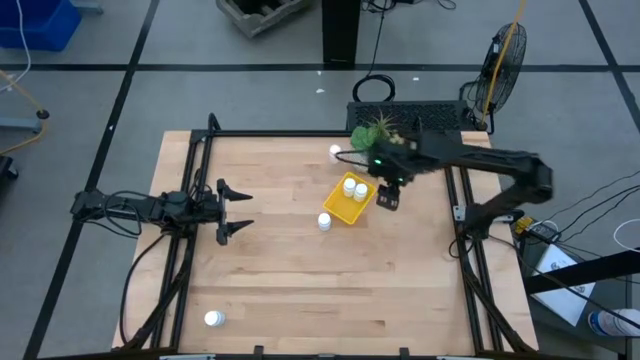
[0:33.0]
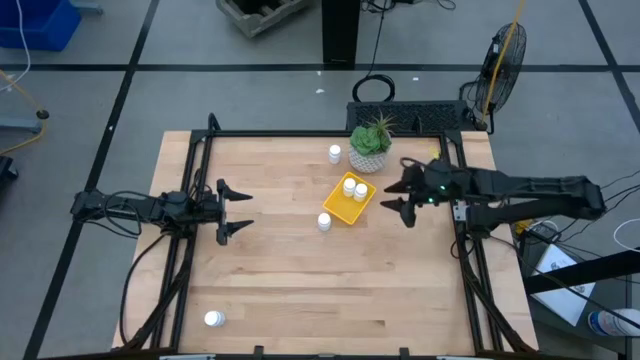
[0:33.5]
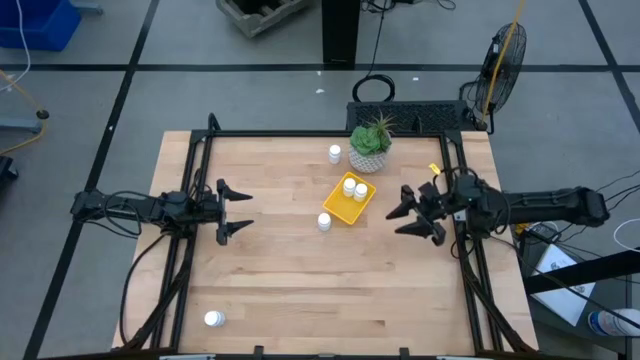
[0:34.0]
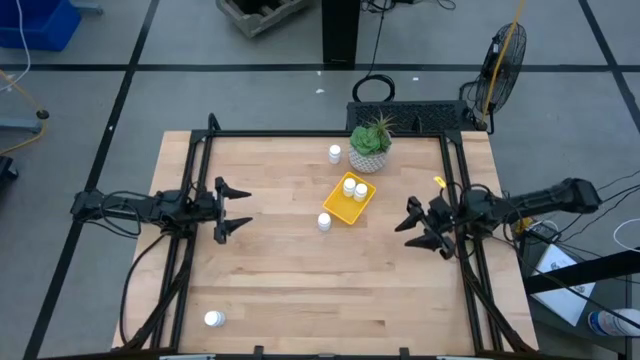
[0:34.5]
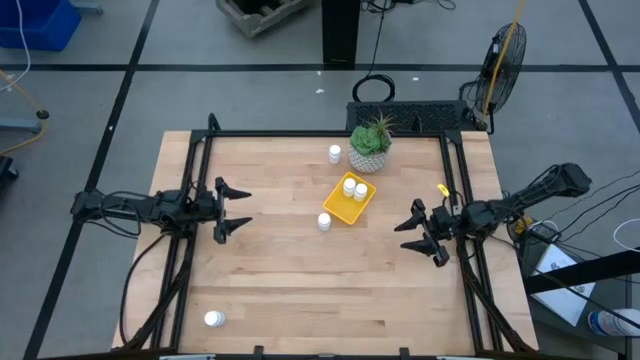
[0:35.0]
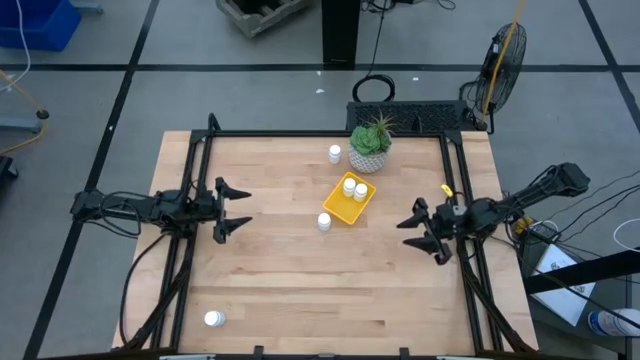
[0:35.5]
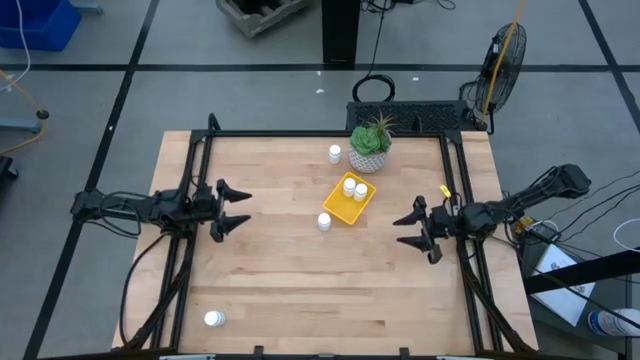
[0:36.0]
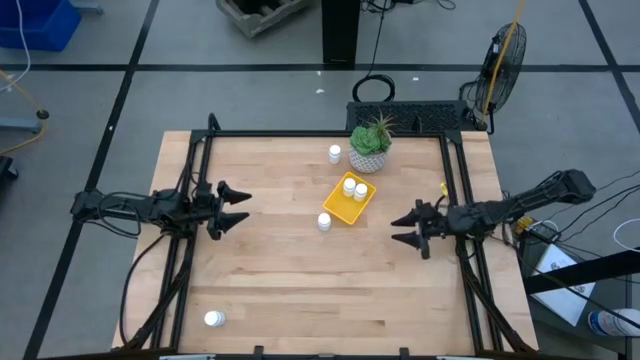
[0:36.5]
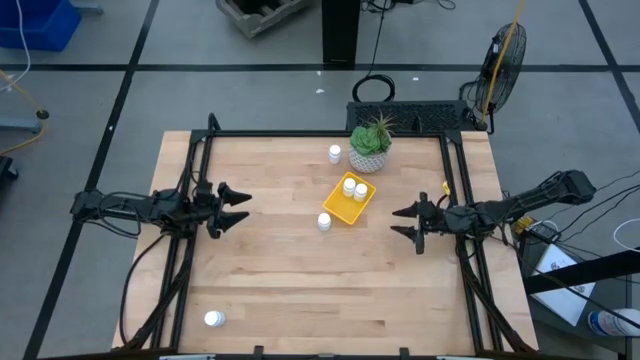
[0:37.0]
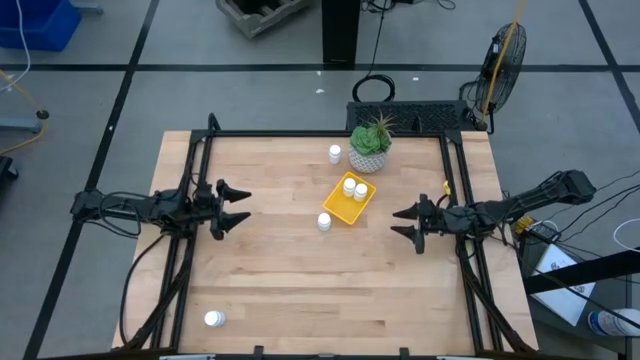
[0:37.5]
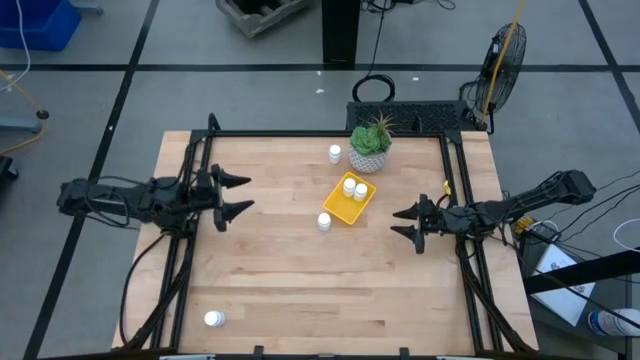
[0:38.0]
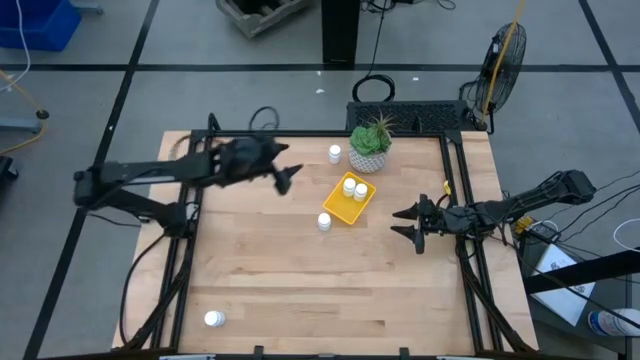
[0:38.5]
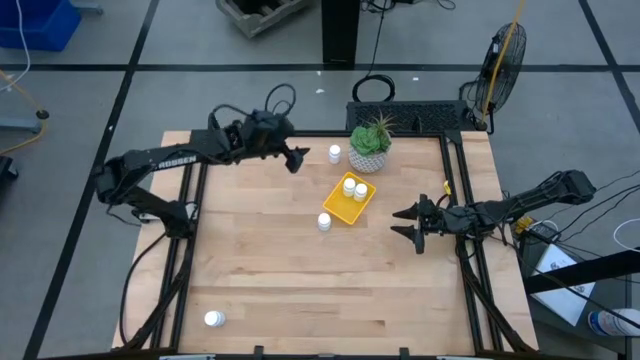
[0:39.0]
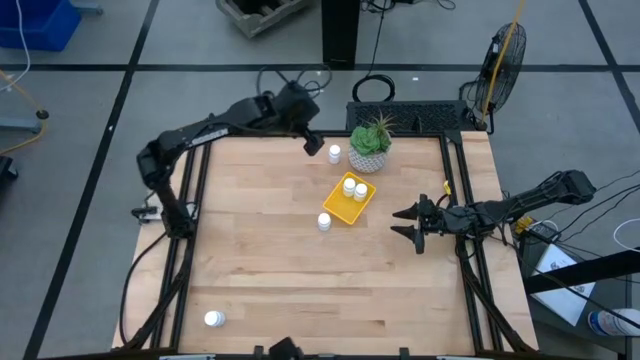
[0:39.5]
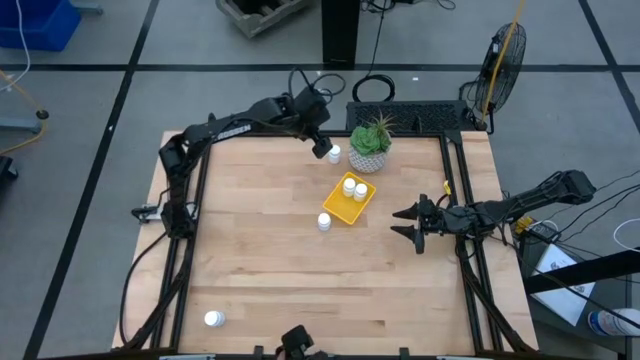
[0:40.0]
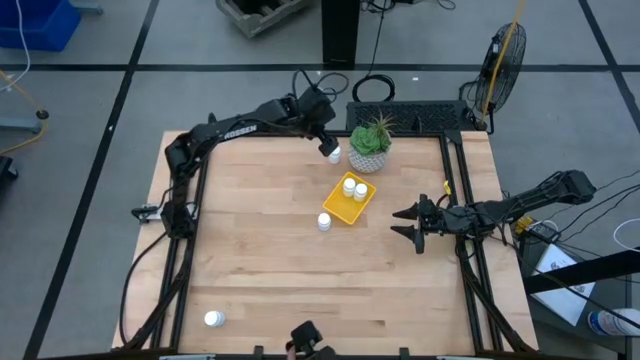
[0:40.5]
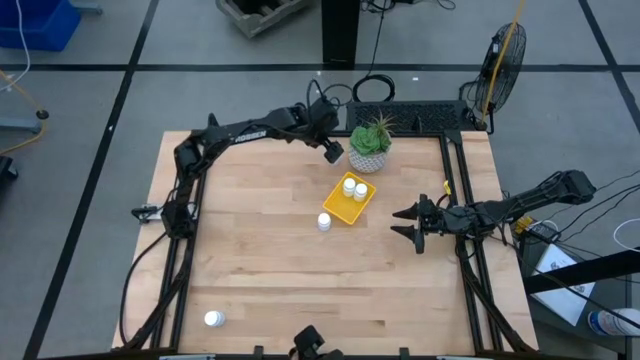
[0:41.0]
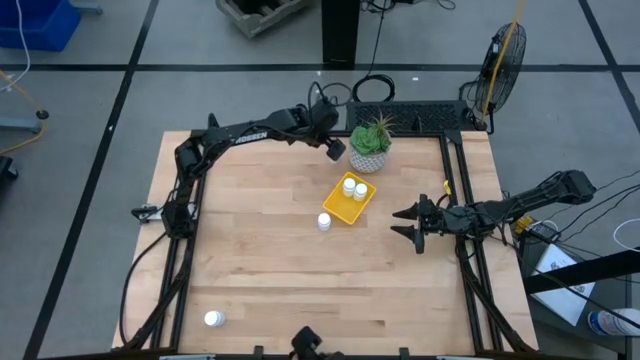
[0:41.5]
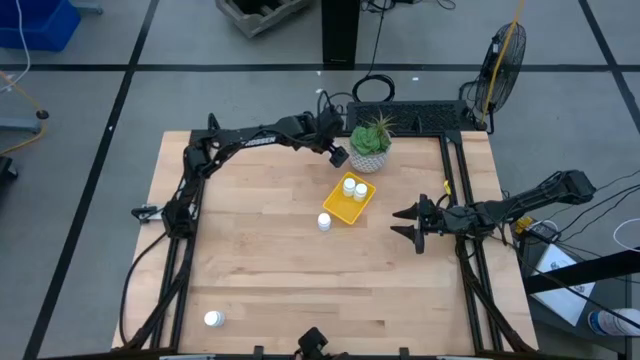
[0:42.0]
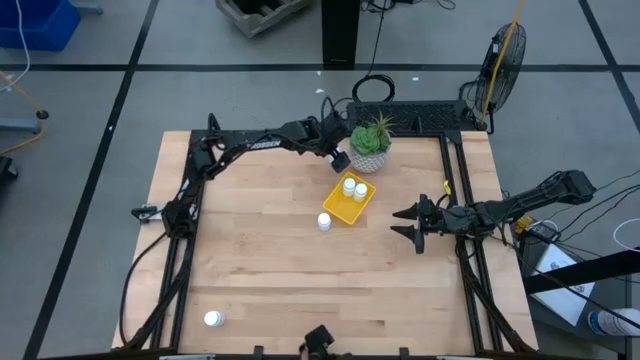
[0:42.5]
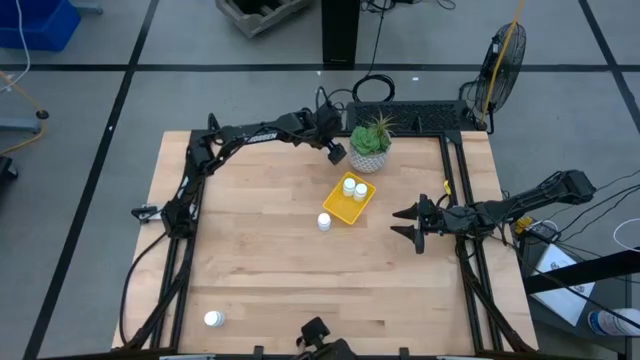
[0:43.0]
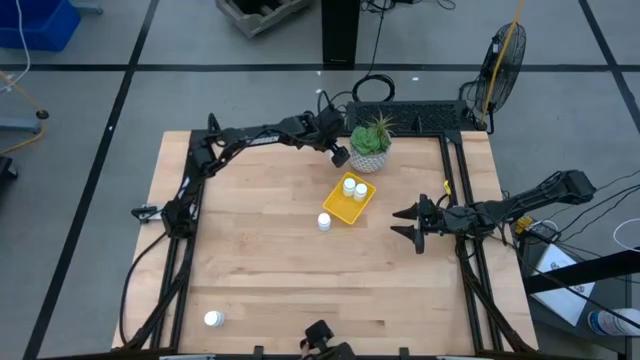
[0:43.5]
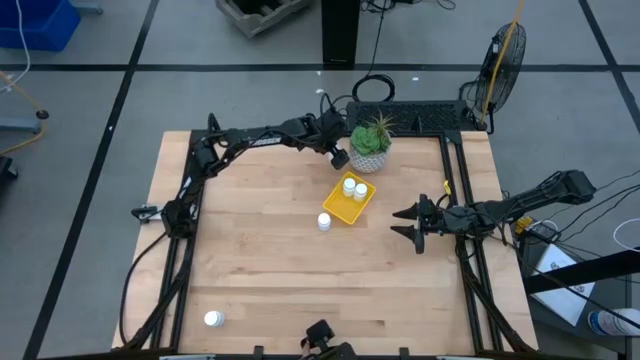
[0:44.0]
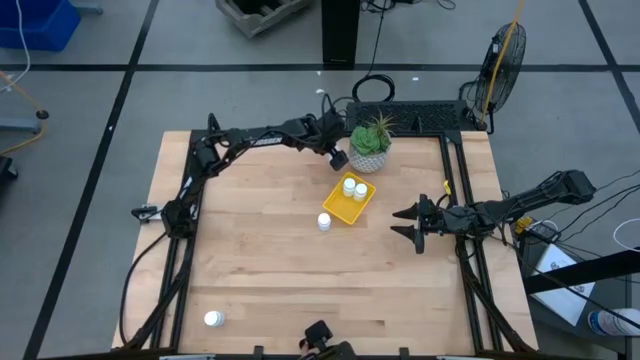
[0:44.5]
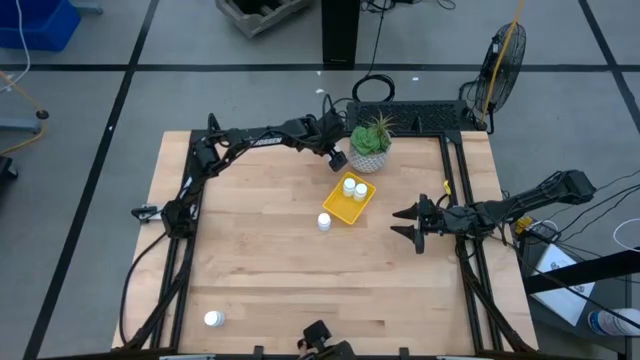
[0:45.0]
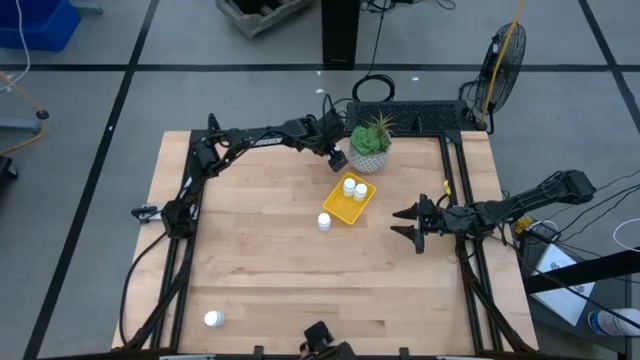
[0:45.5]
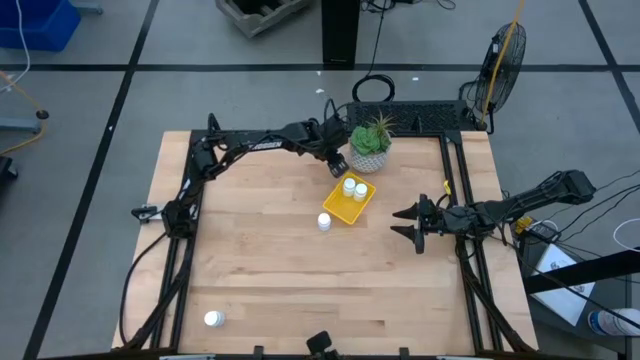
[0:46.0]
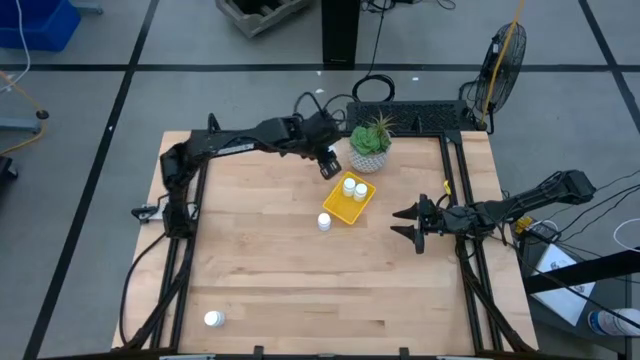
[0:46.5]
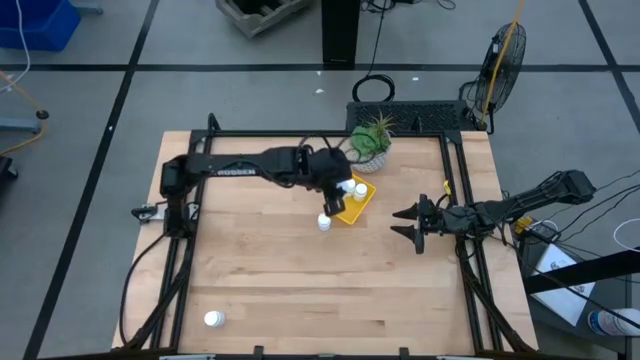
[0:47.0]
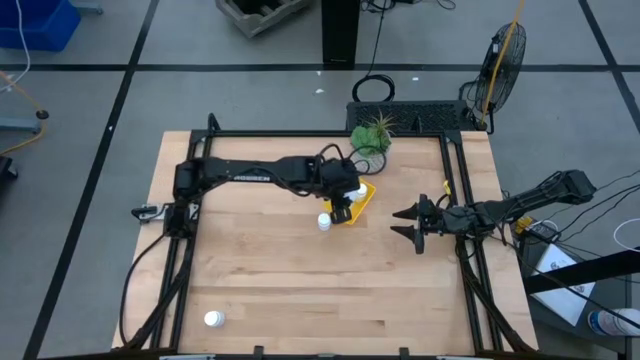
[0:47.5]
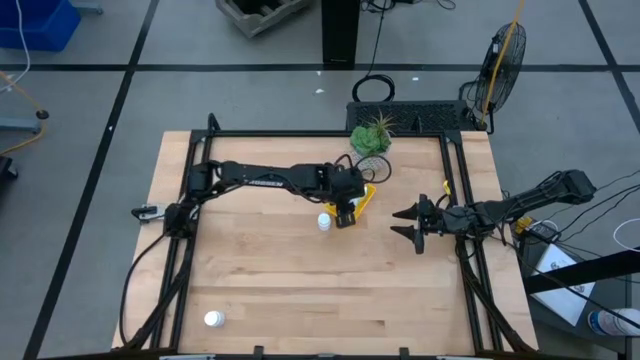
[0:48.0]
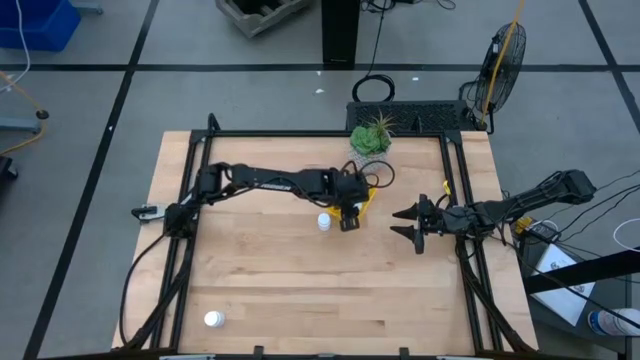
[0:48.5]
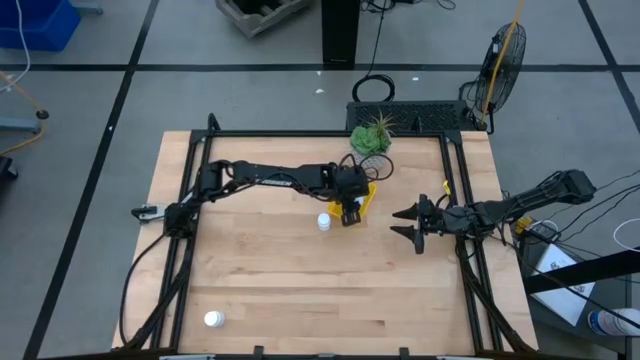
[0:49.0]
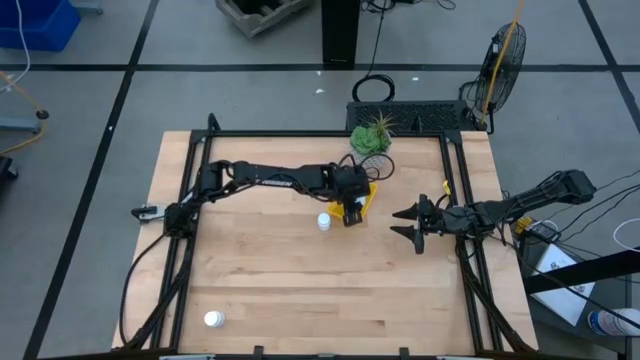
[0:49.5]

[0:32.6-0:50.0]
Task: Pick and place pill bottles into a basket
Put the top white medicine bottle into the bin
